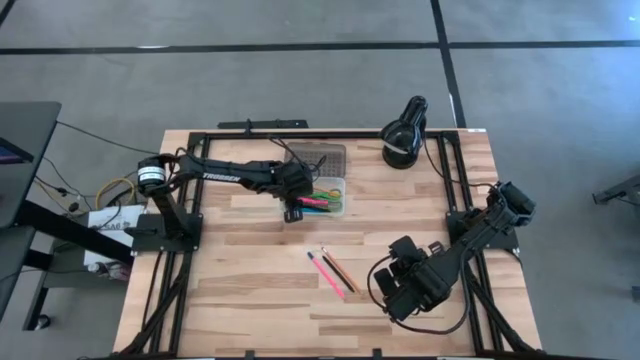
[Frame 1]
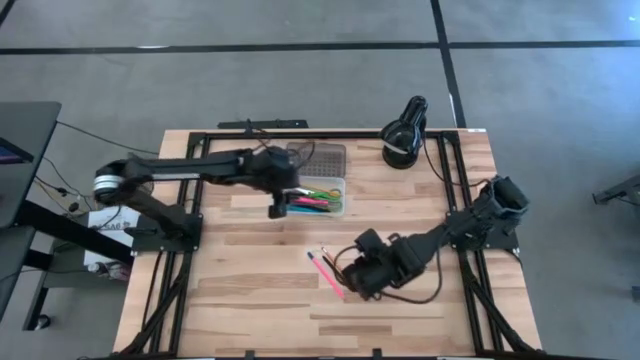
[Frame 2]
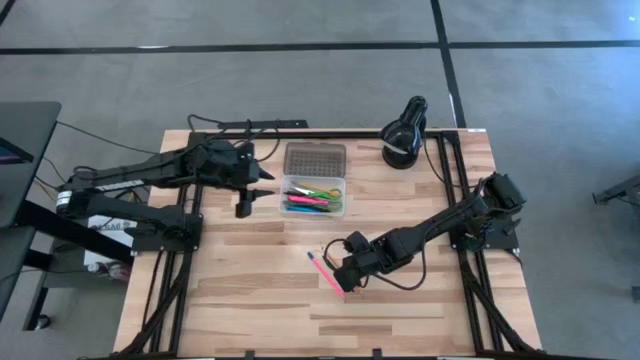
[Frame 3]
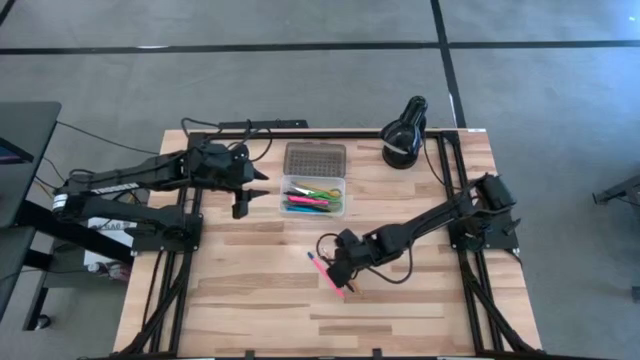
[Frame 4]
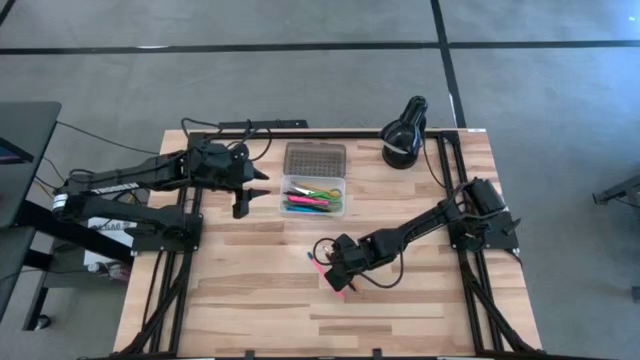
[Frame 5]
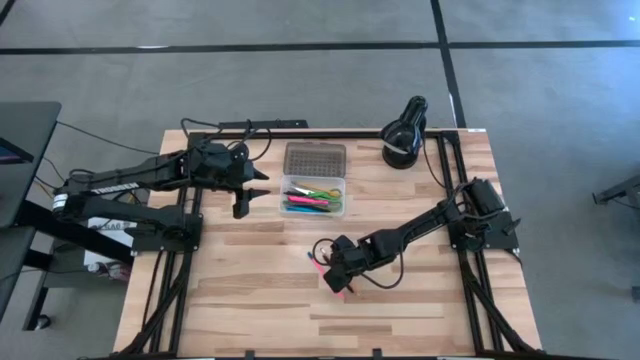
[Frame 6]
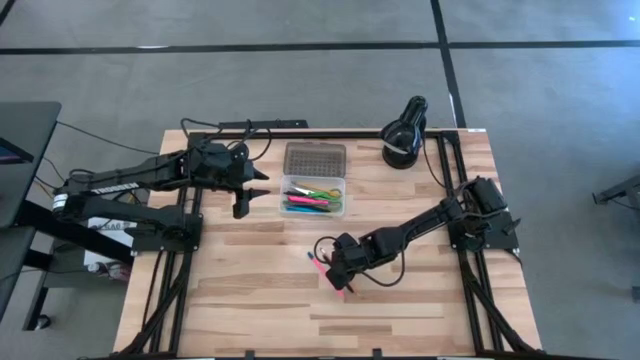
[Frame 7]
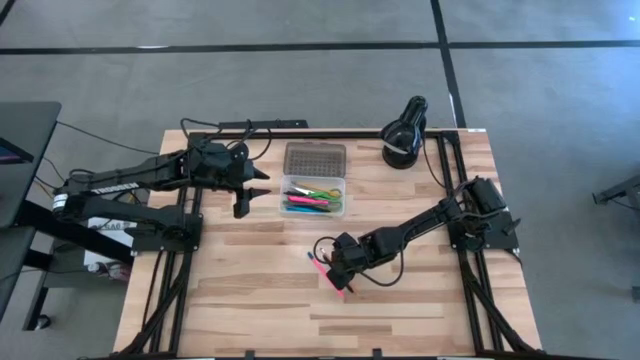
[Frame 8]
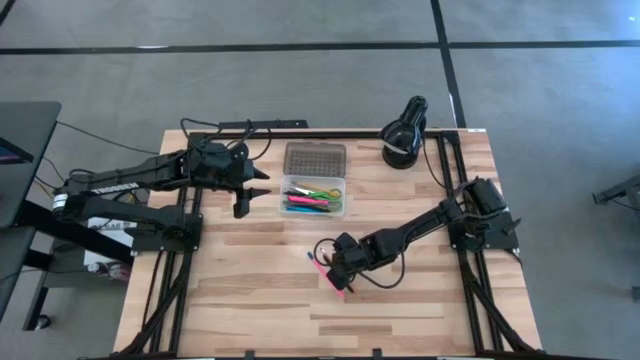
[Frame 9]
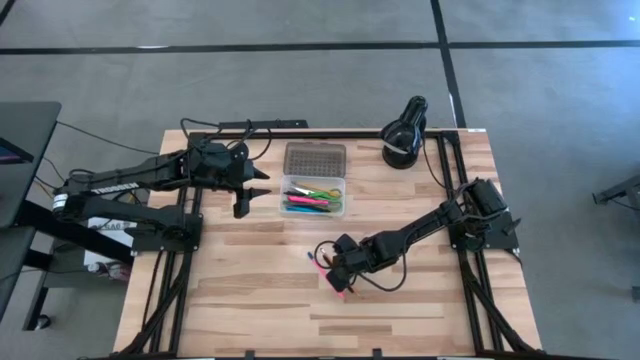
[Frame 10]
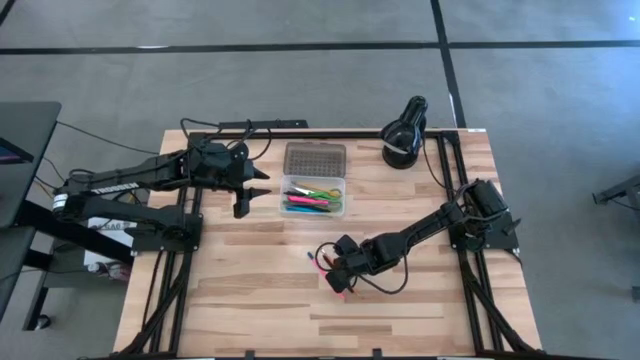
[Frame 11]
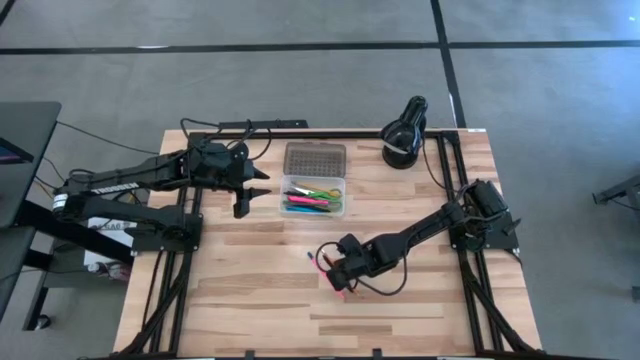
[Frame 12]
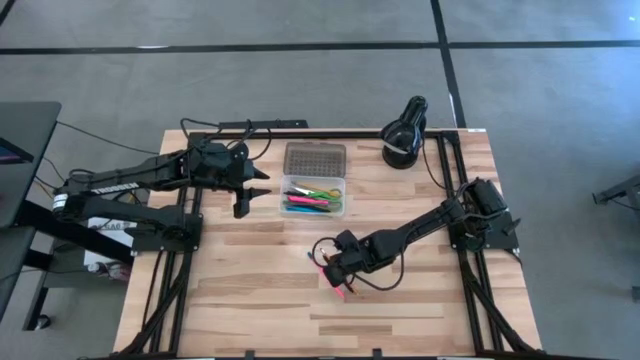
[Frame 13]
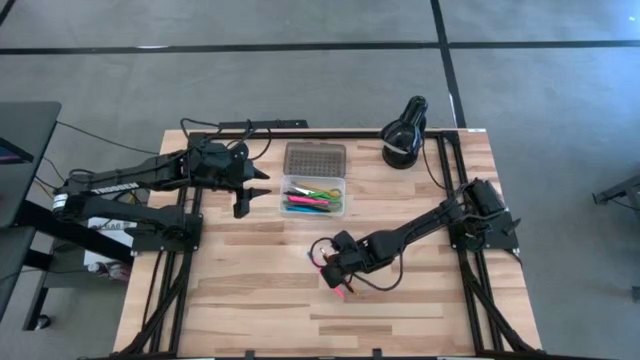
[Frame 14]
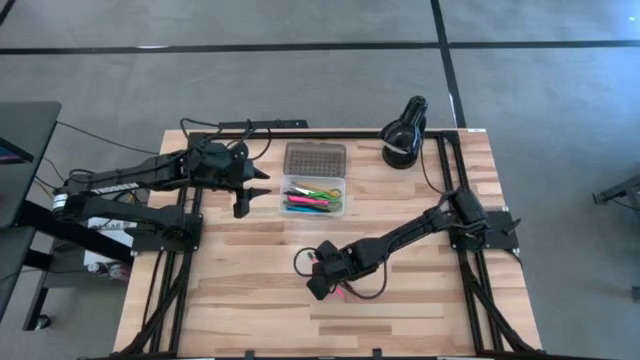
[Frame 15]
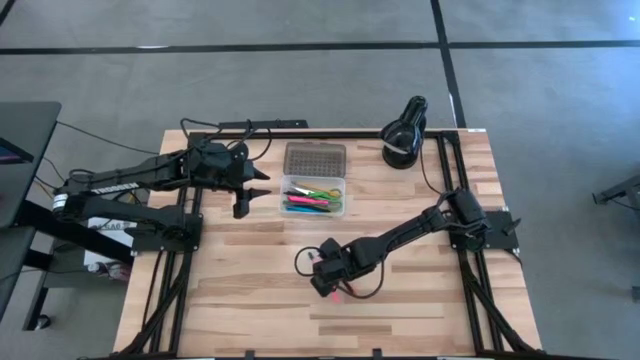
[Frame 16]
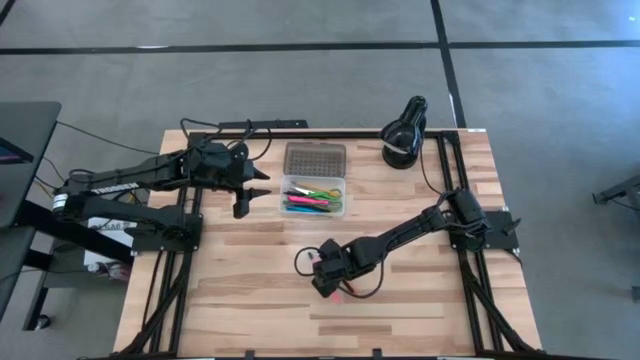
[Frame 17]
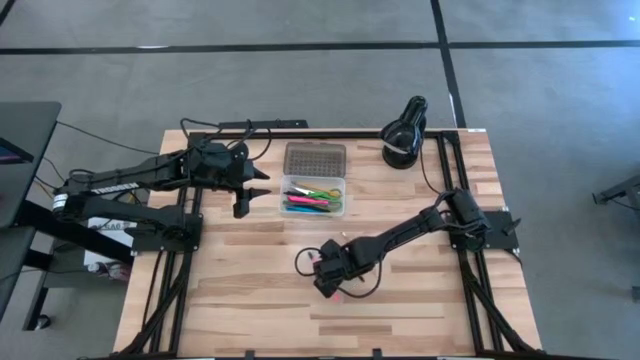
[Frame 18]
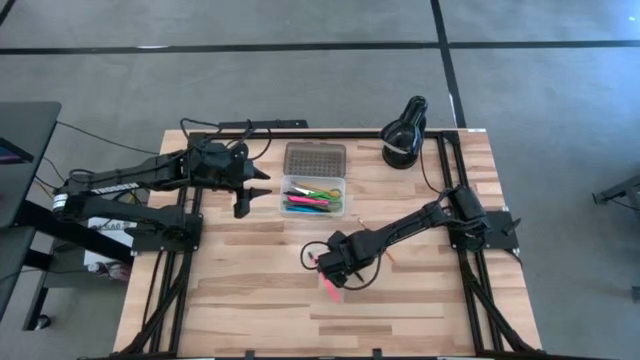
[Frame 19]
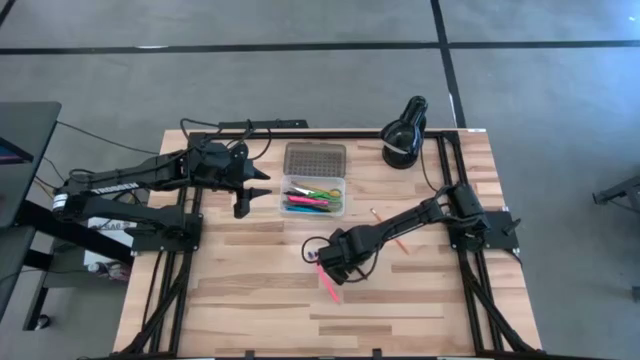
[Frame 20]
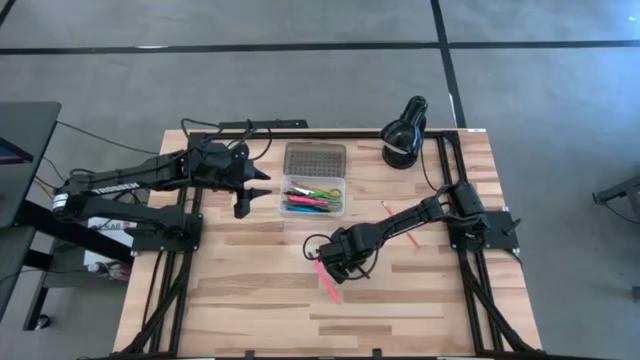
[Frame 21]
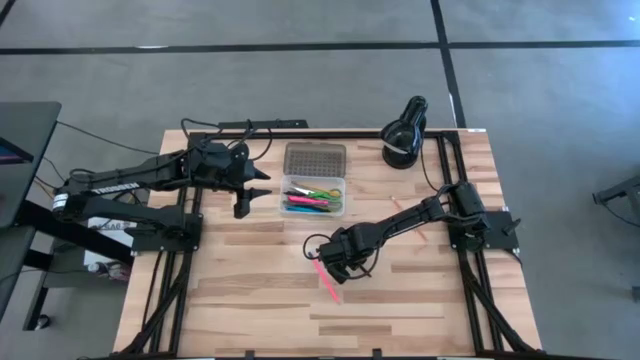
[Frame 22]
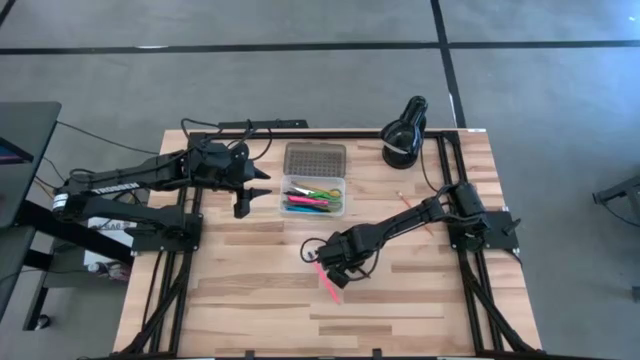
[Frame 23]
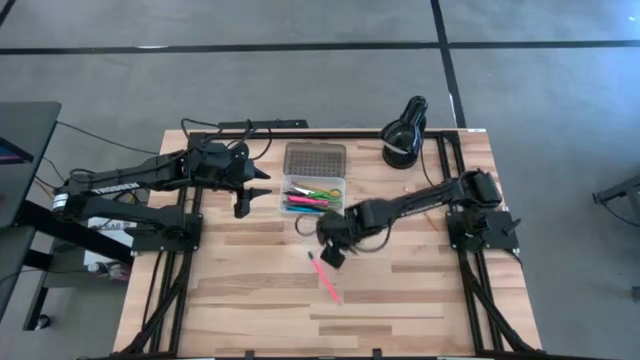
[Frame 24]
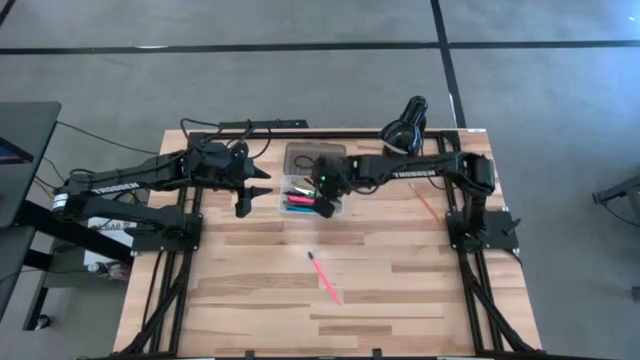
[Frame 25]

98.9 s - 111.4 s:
Task: Pick & place school supplies into a supply box
Put the black pen into the supply box

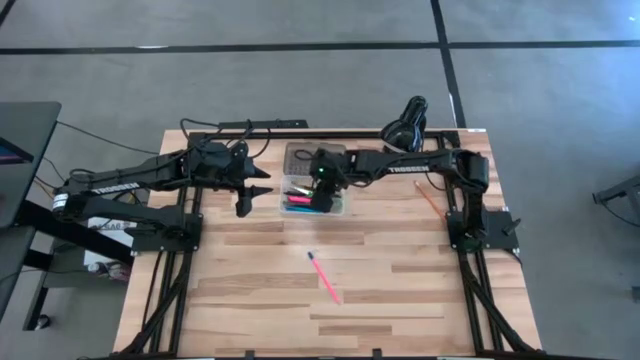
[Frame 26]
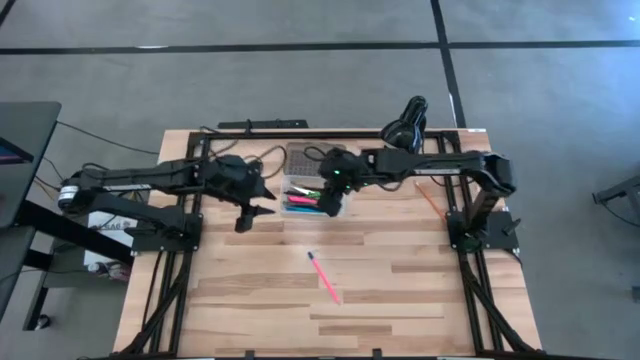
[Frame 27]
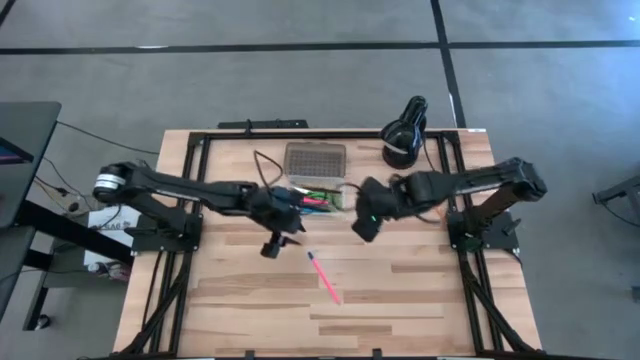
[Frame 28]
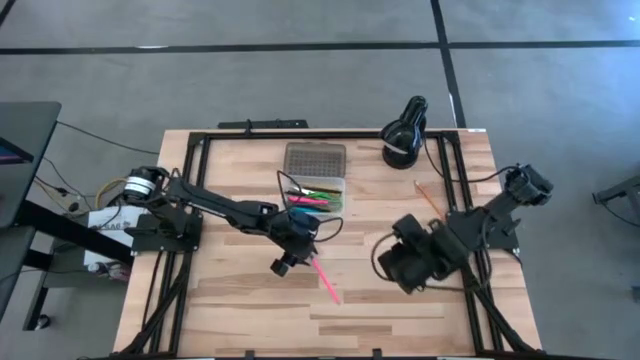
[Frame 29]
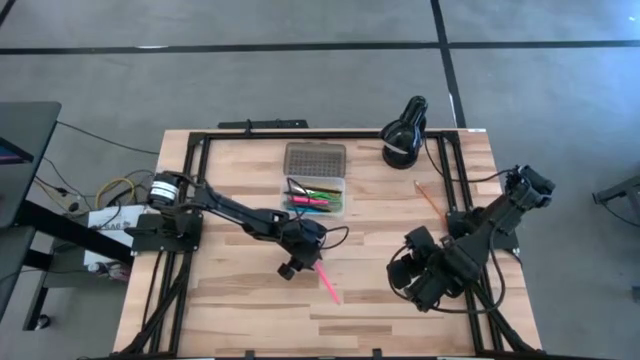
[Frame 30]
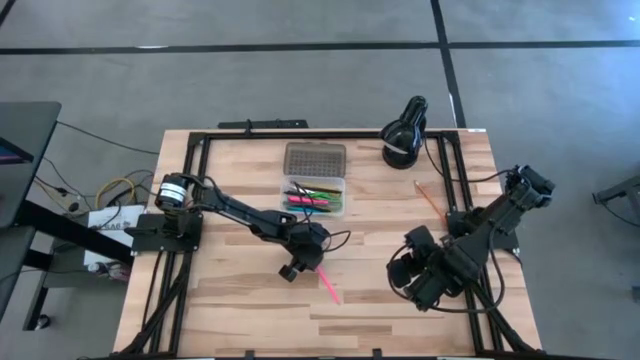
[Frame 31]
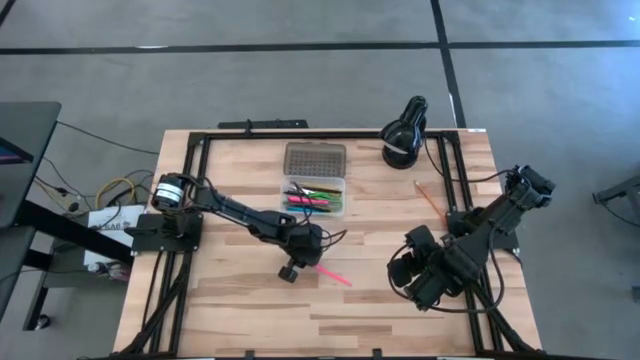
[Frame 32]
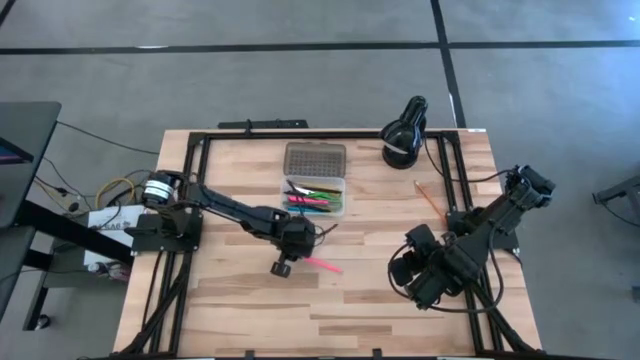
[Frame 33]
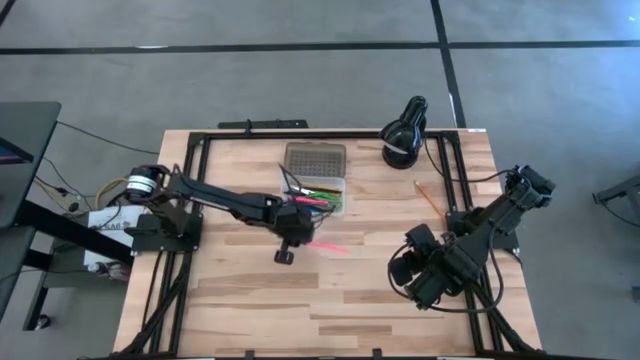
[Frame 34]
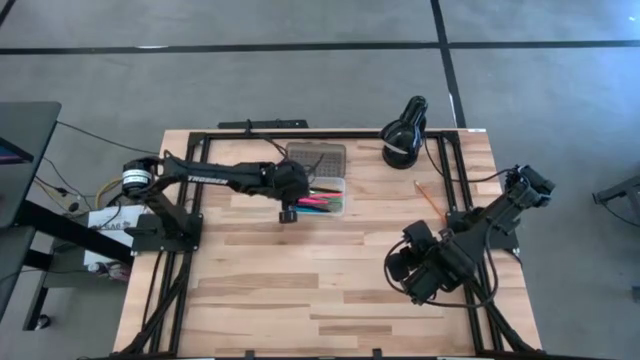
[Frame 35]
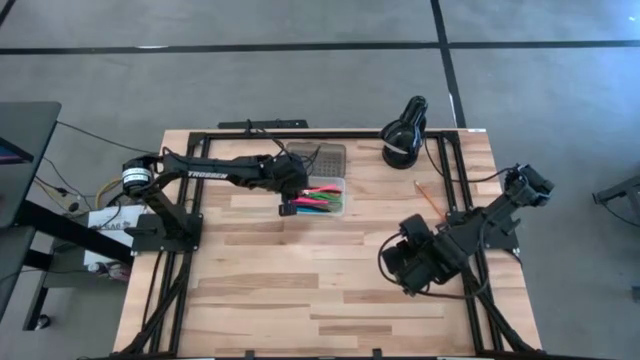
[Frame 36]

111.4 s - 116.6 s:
Put the pink pencil into the supply box

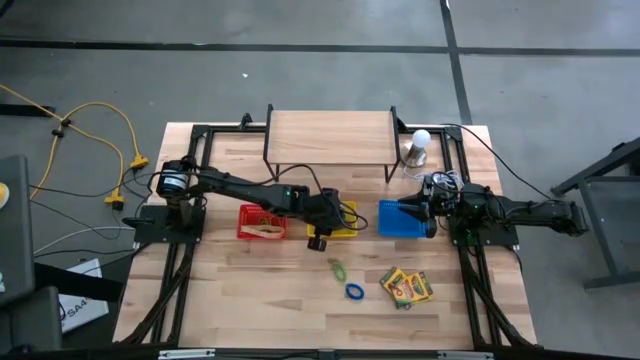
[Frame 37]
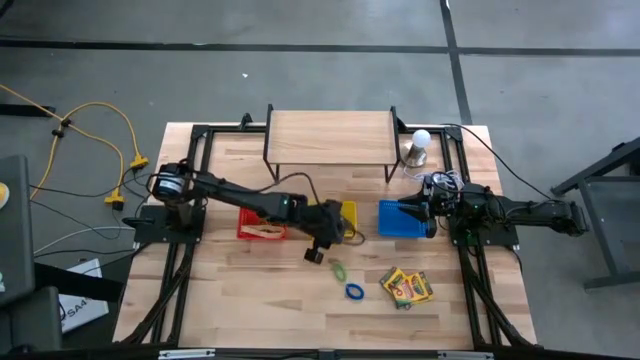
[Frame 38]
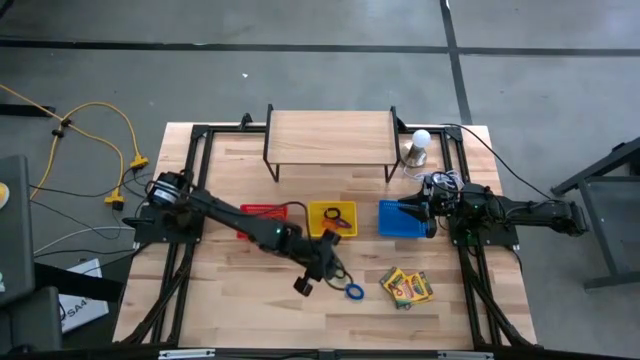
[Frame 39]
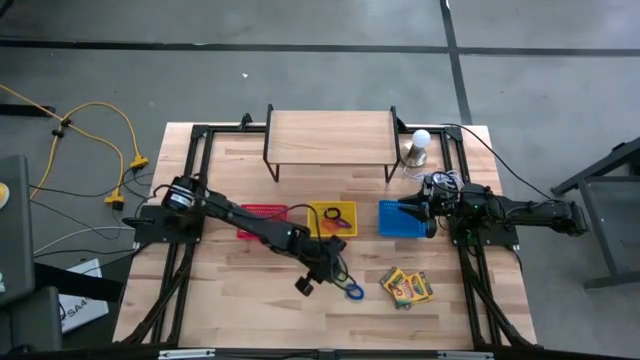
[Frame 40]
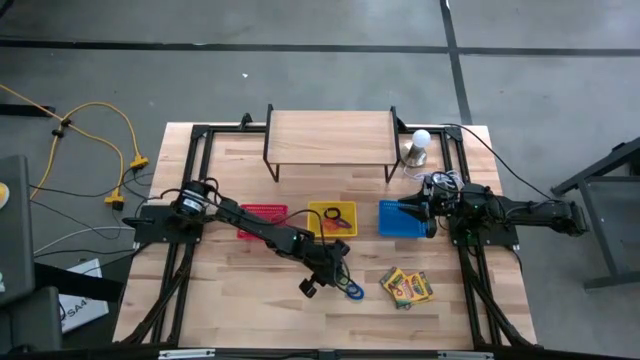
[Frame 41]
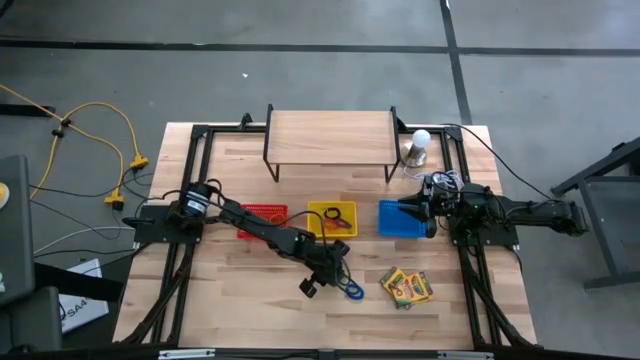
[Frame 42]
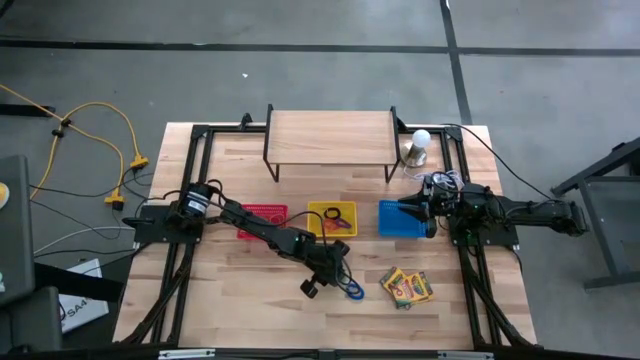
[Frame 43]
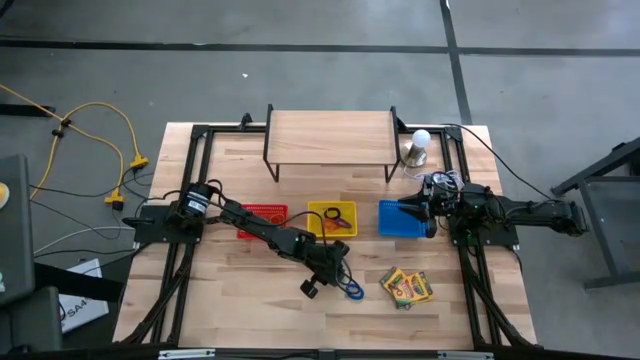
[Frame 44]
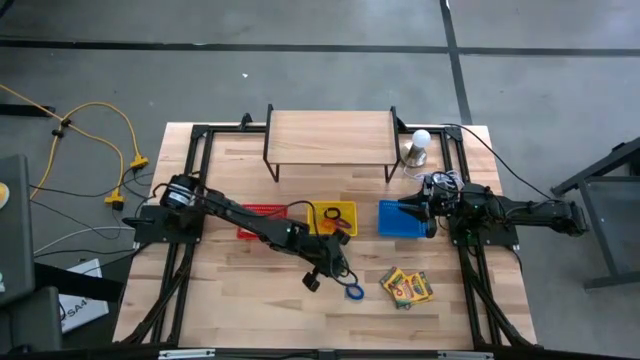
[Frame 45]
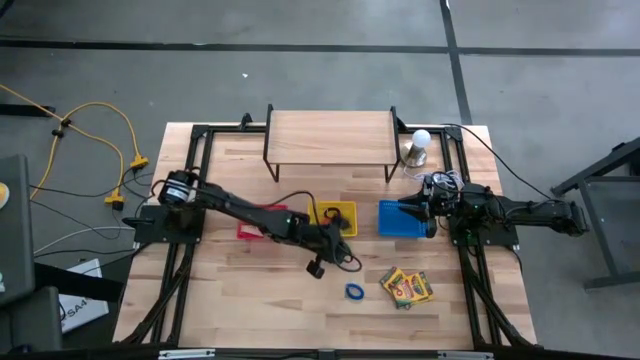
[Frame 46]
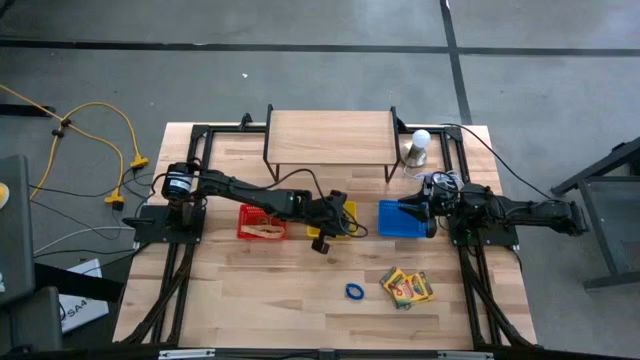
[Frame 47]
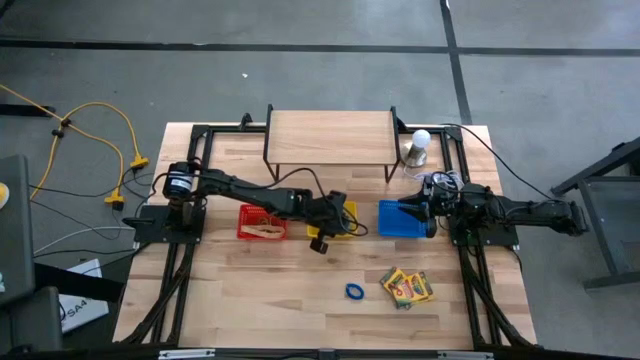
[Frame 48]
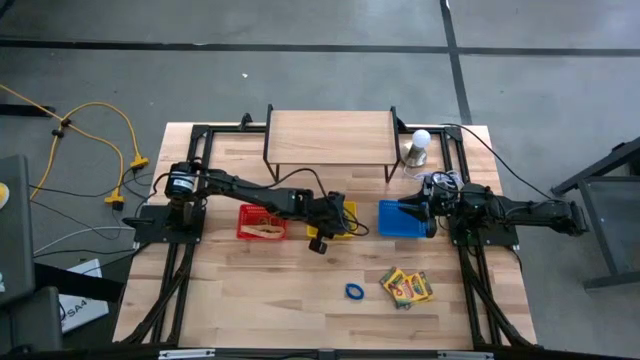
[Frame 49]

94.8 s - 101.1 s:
Task: Pick & Place Office Desk Supplies
Put the green spring keychain into the yellow bin
